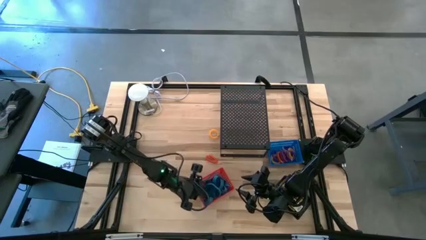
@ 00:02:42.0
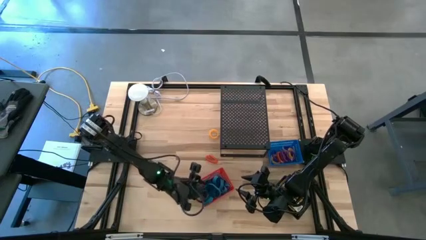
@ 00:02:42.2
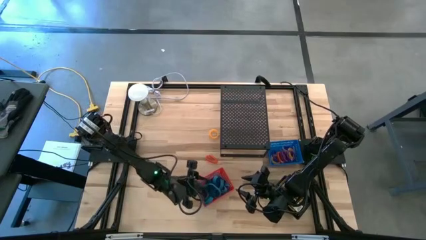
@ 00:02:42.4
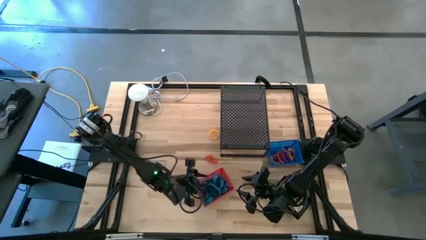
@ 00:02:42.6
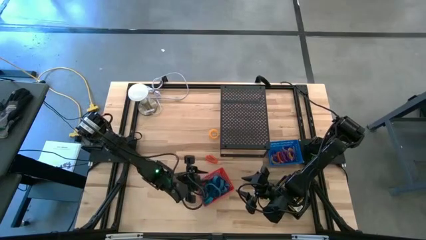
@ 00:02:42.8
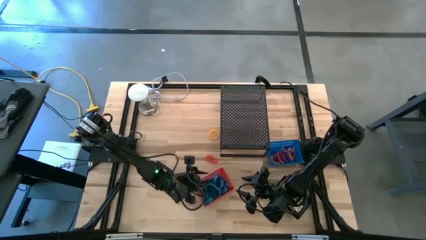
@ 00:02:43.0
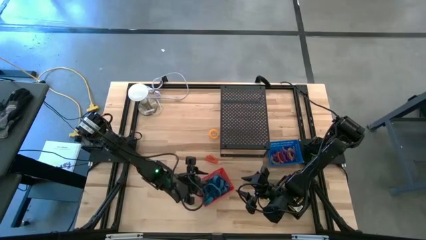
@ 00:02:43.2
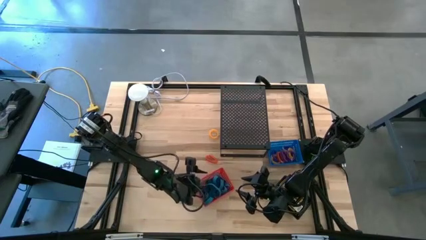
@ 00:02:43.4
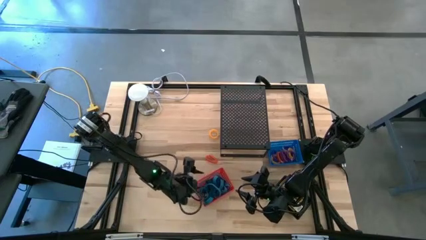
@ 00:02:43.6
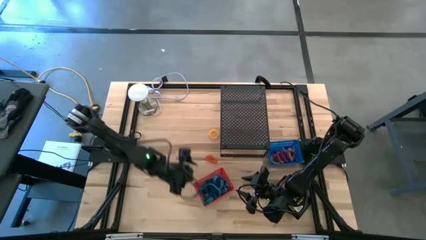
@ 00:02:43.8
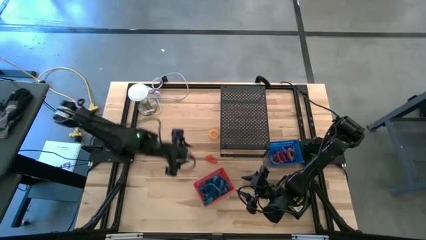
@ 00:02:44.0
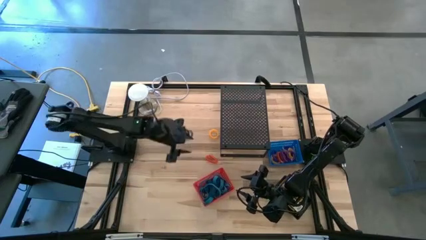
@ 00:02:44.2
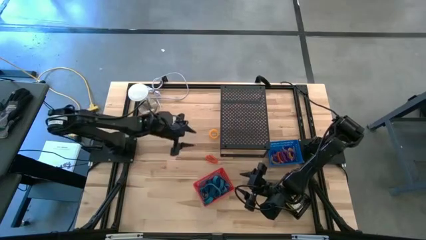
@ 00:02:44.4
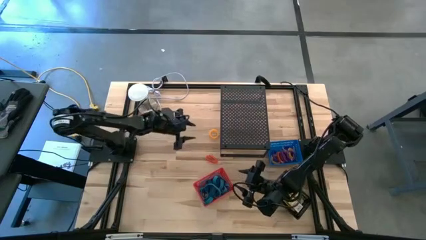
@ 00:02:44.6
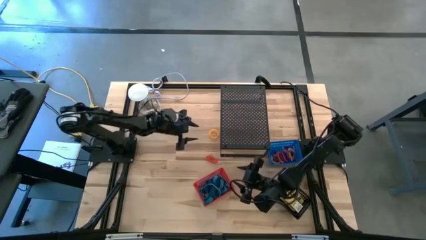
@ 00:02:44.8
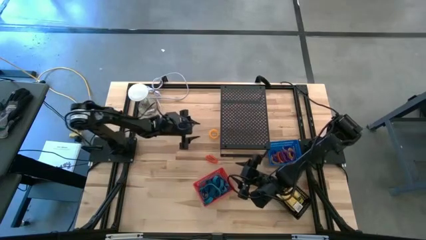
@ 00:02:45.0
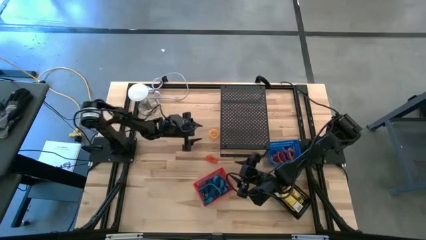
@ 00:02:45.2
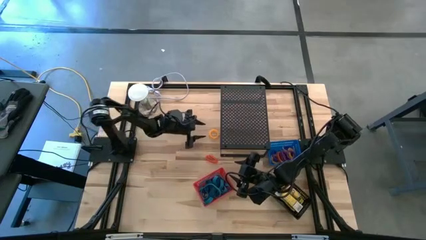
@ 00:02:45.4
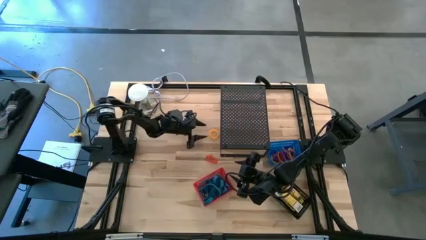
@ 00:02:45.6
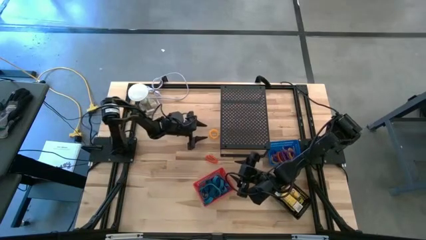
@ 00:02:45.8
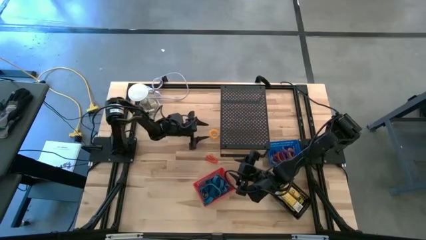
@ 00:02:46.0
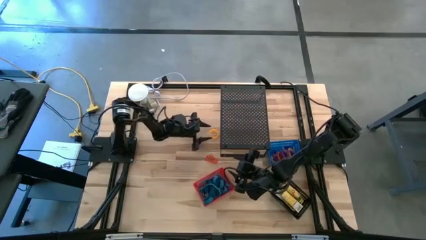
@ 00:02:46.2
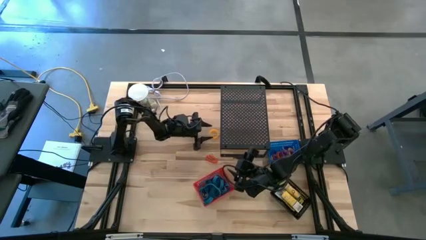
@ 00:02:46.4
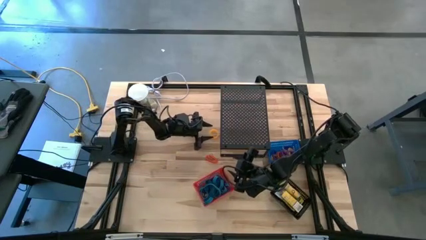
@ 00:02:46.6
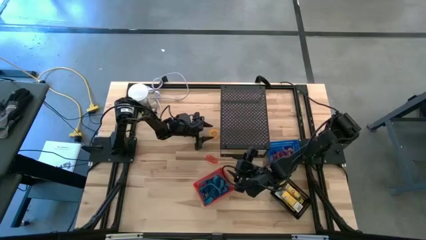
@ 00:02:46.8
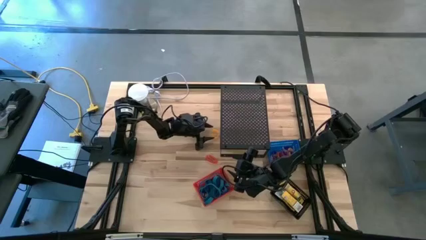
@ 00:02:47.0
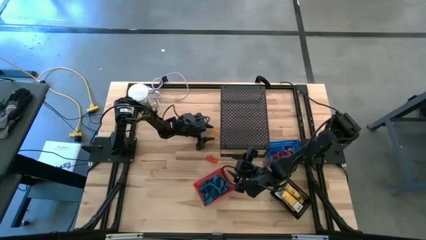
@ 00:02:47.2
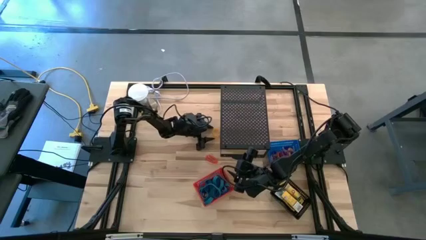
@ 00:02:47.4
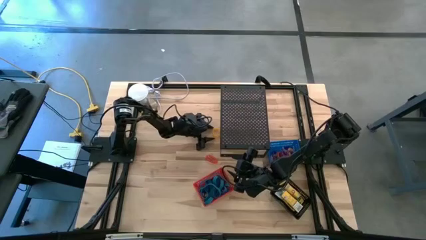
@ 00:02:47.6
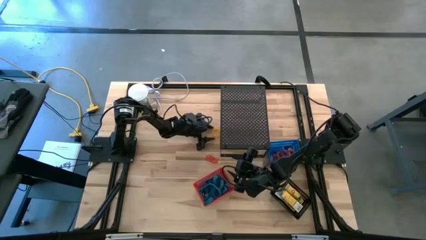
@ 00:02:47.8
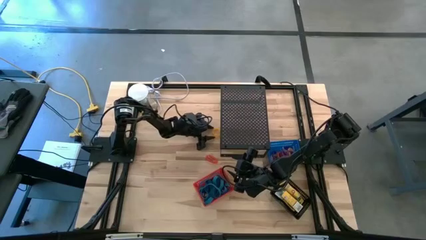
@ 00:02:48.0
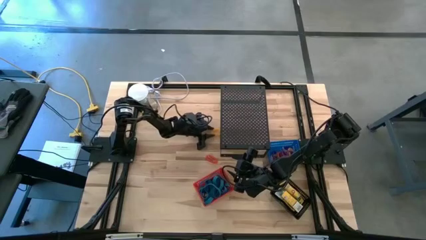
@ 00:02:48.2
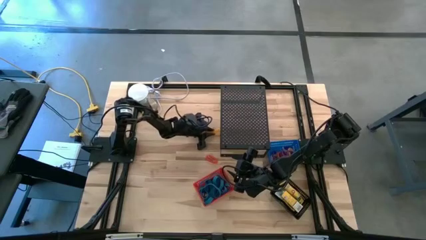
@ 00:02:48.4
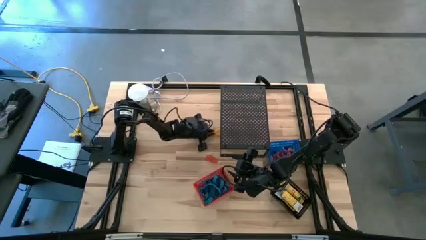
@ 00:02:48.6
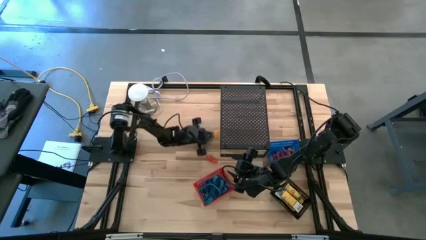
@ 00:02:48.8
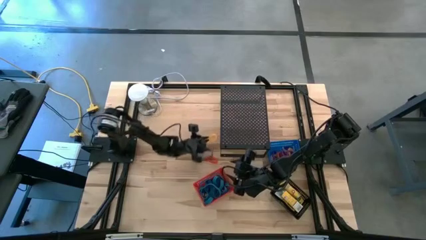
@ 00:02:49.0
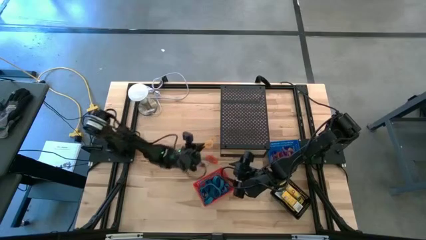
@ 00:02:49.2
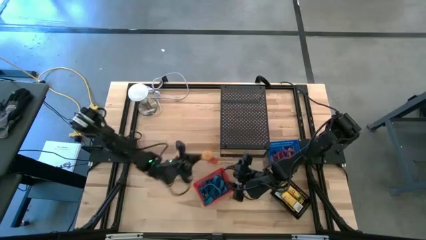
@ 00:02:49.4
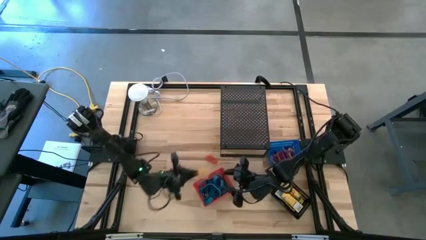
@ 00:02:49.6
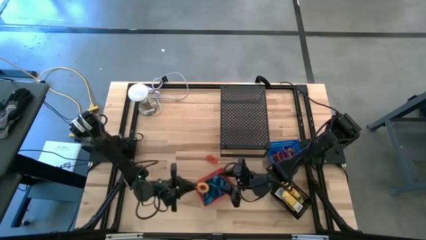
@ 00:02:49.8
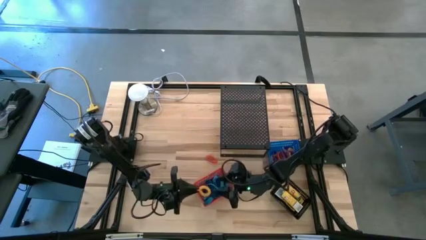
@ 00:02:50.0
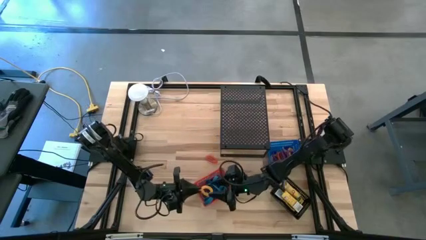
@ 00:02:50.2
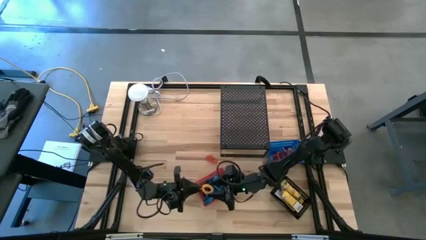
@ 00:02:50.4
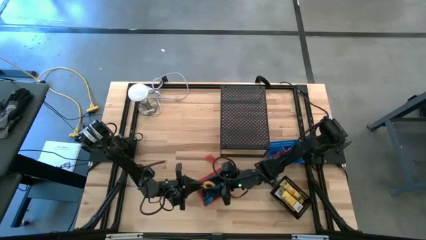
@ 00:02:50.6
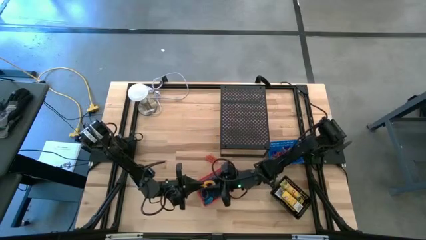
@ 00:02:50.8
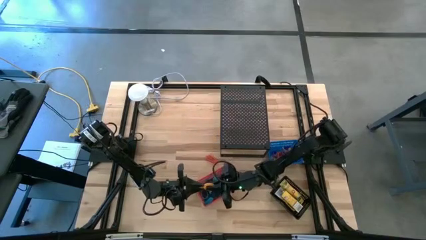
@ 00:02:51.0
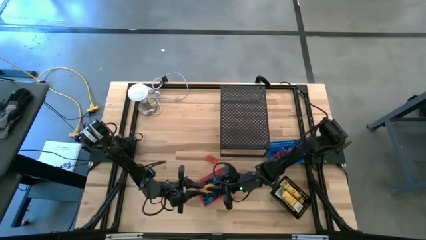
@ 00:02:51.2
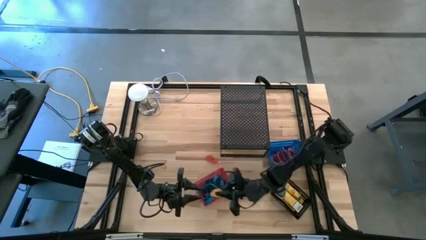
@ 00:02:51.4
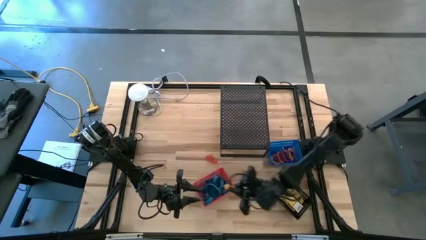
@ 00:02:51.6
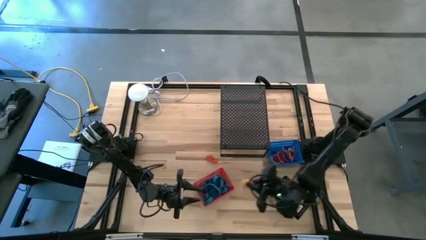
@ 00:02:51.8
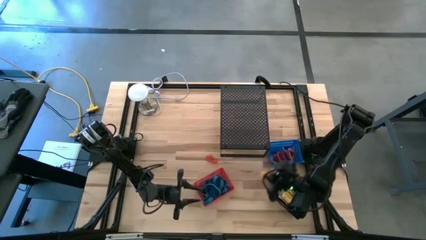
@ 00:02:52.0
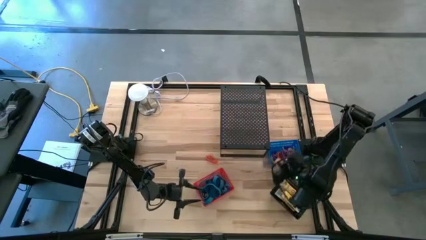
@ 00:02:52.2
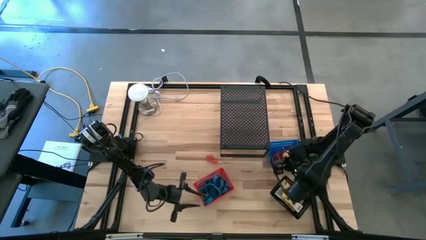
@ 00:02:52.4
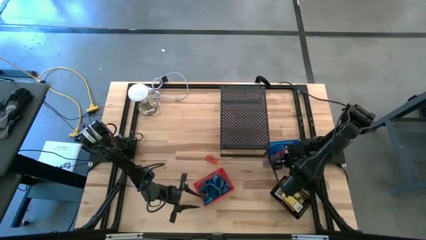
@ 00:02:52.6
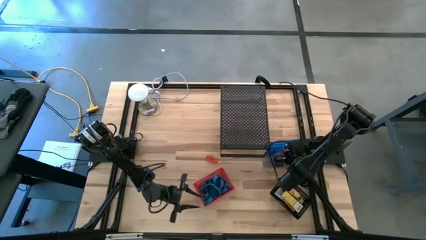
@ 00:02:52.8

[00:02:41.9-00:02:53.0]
Task: Pick & Place Office Desk Supplies
Put the yellow spring keychain into the blue basket

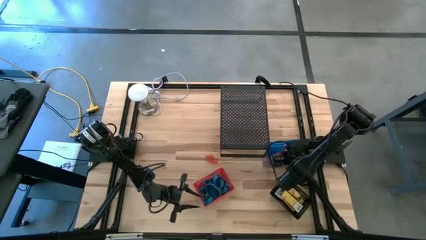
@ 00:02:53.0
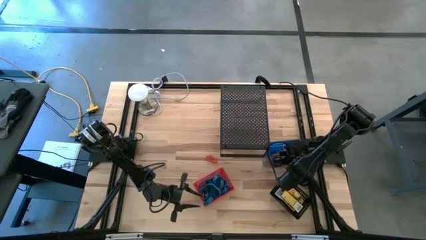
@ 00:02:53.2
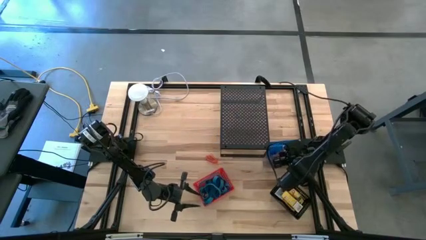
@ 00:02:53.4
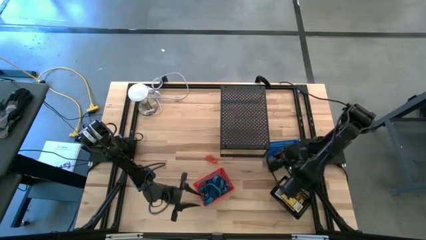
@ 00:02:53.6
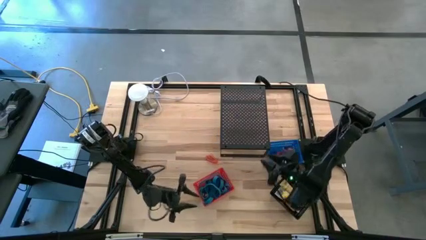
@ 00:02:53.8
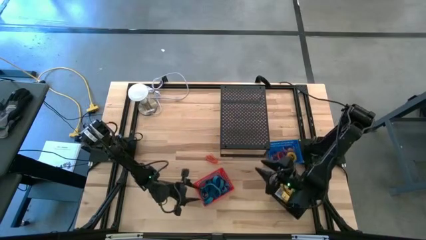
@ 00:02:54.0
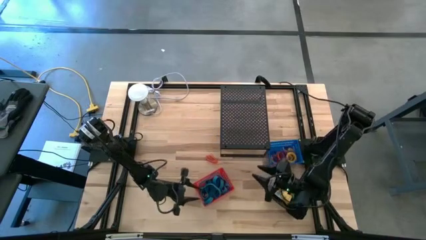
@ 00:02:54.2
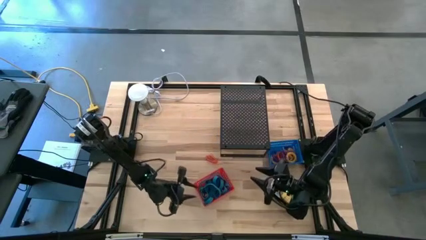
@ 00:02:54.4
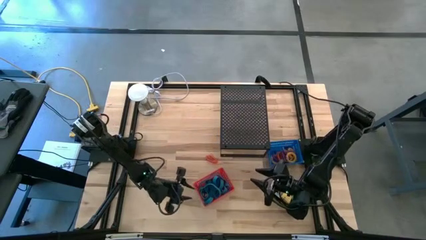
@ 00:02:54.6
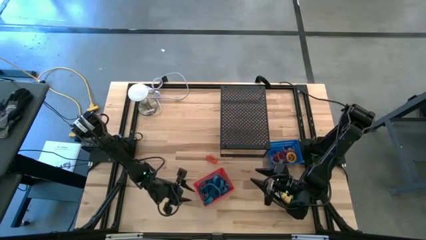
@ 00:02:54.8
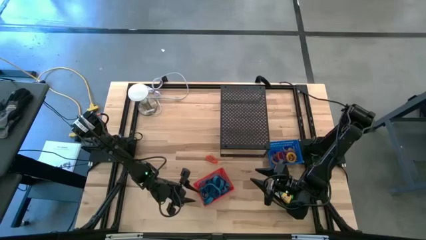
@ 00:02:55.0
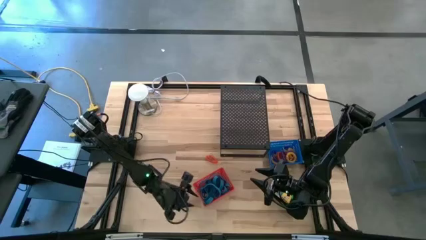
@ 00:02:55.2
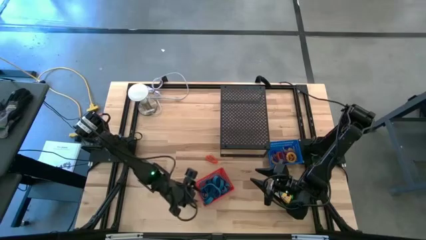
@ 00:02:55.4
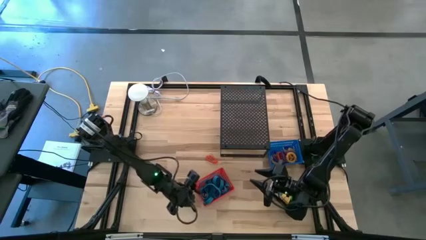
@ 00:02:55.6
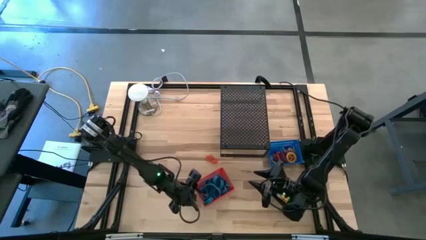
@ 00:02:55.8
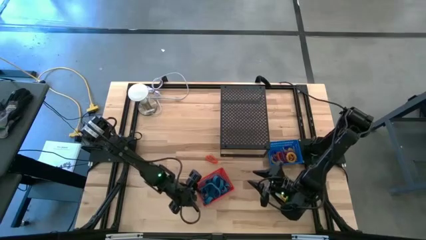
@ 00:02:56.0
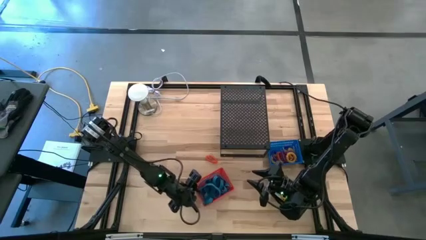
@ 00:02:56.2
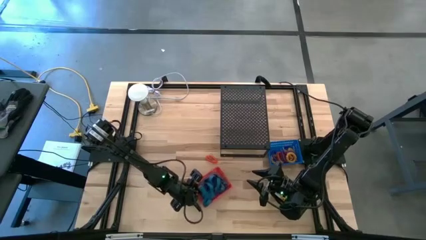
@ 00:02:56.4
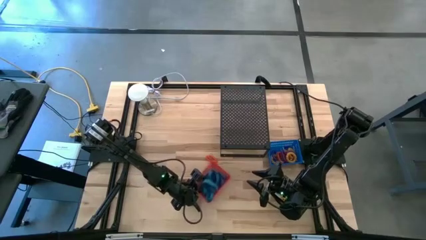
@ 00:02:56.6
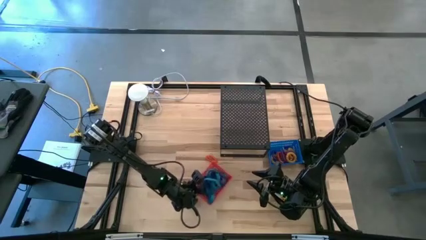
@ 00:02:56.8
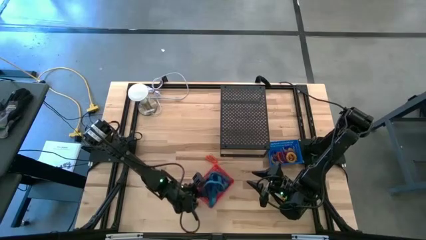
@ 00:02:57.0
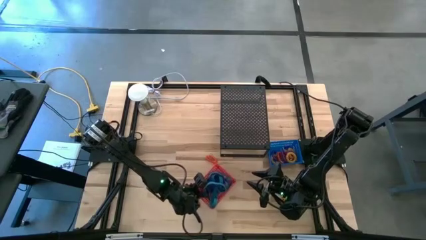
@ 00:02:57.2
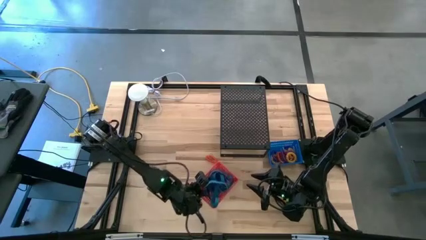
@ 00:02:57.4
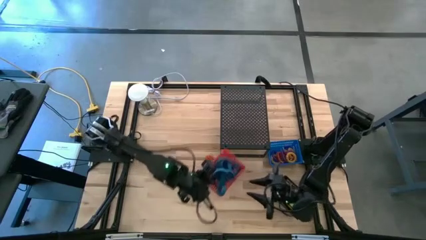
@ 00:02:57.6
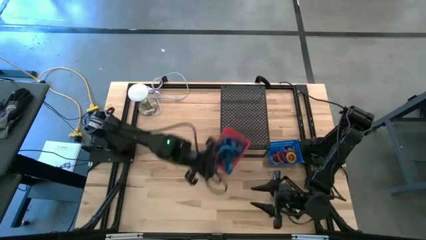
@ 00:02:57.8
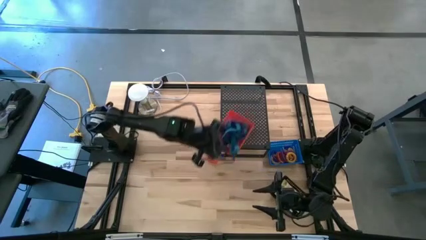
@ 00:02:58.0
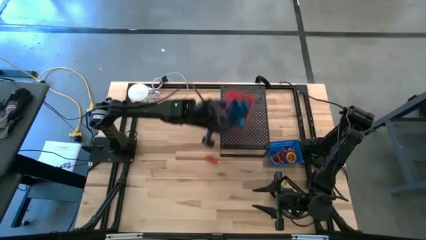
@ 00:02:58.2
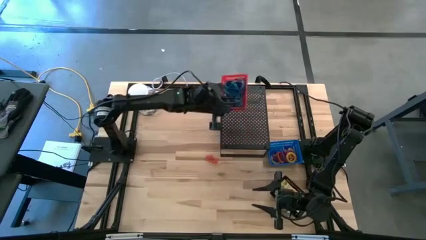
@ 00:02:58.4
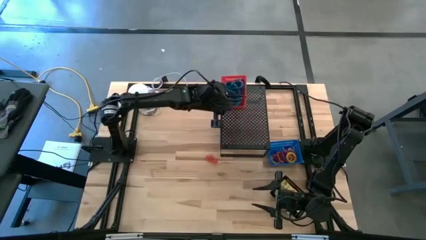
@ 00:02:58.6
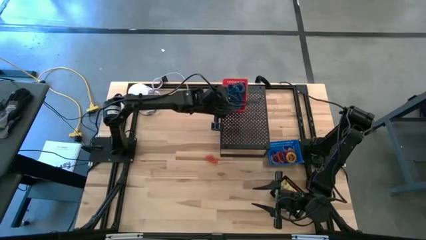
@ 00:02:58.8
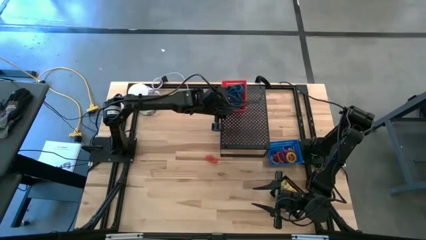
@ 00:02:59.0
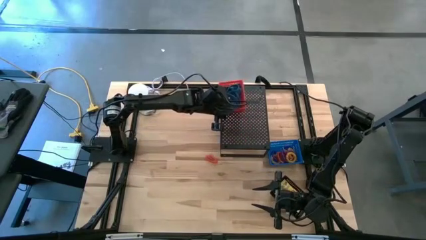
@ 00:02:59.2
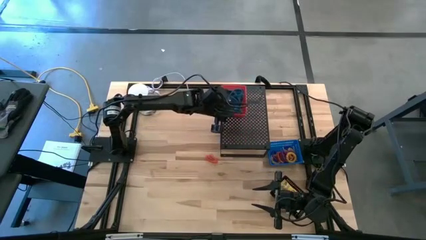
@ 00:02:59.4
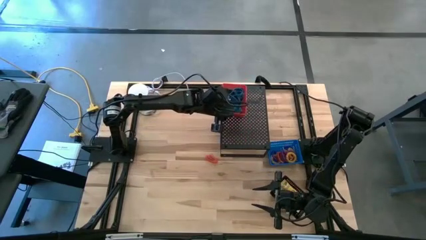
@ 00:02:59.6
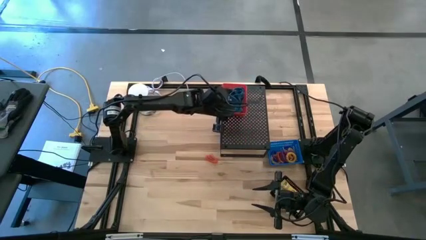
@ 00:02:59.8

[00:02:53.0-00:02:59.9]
Put the red basket on the shelf
